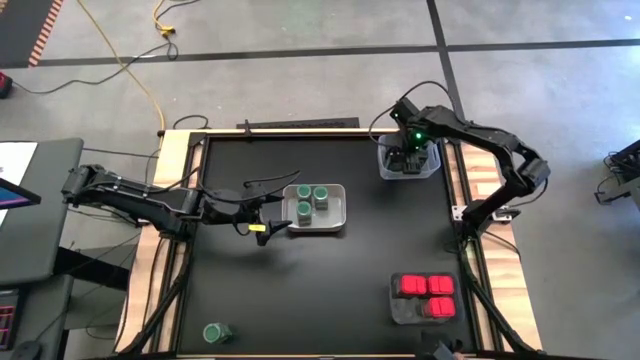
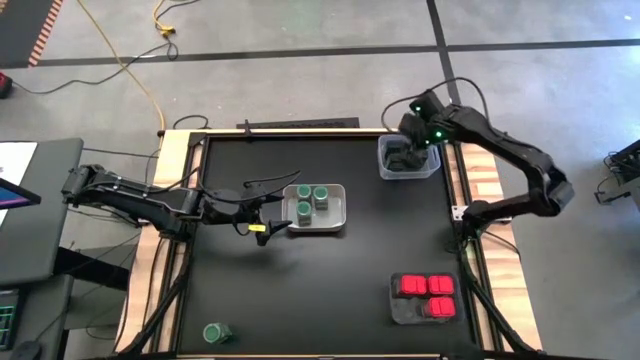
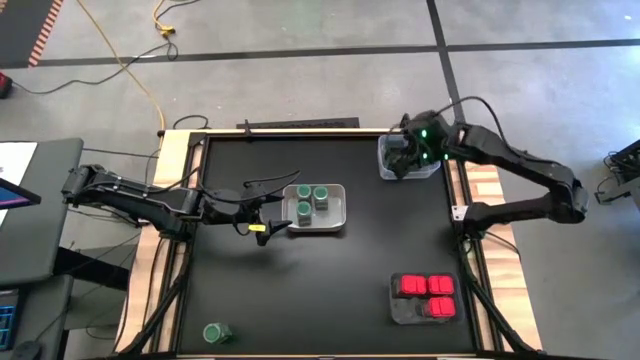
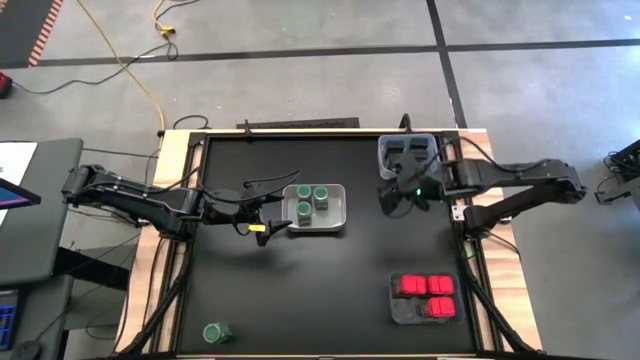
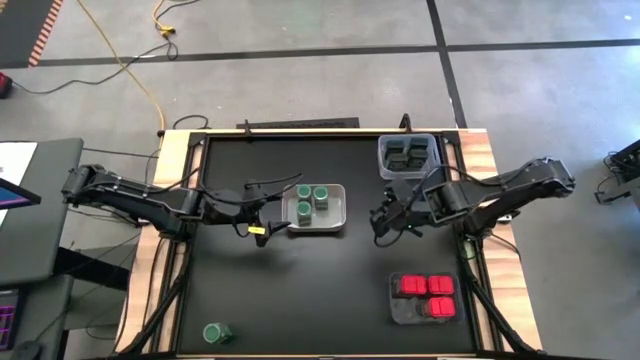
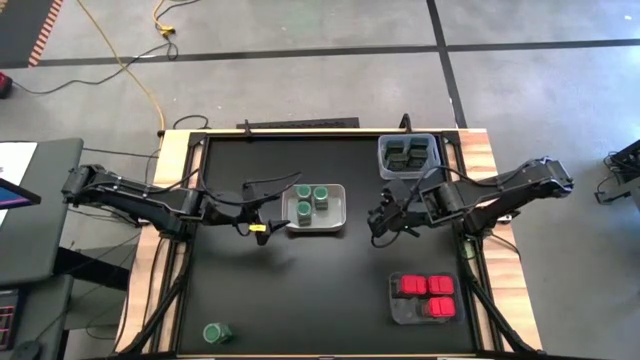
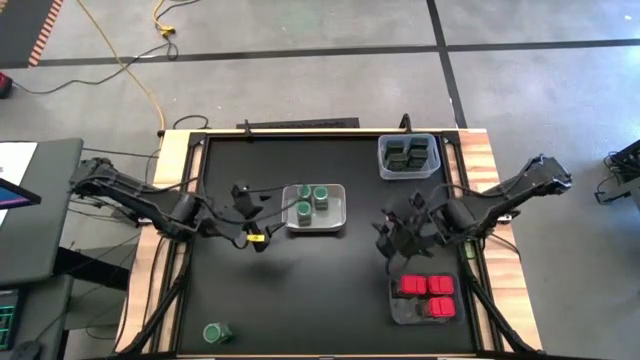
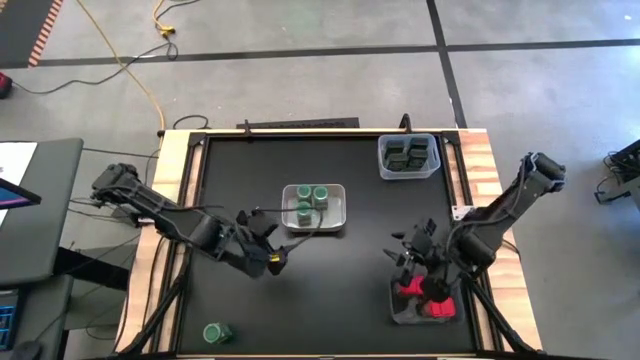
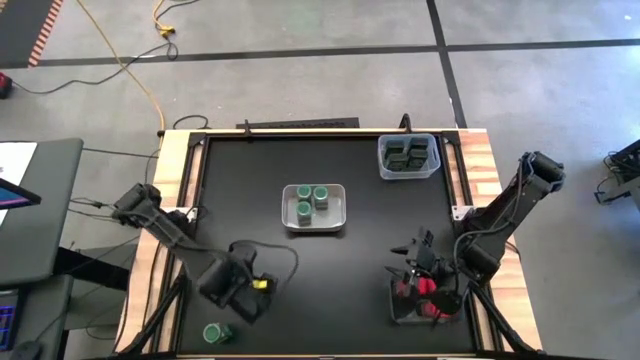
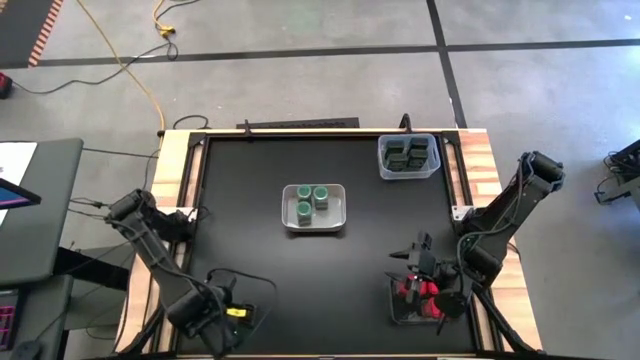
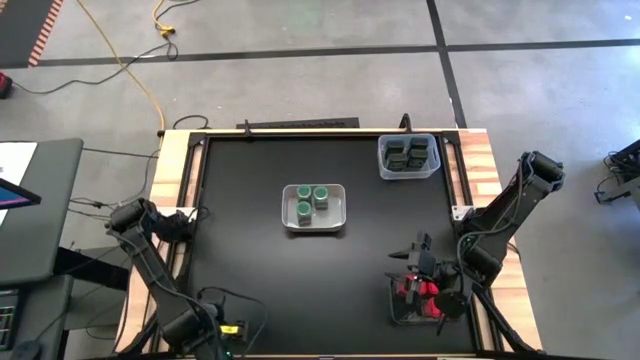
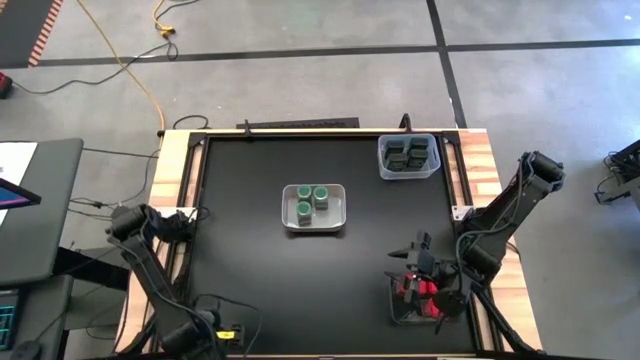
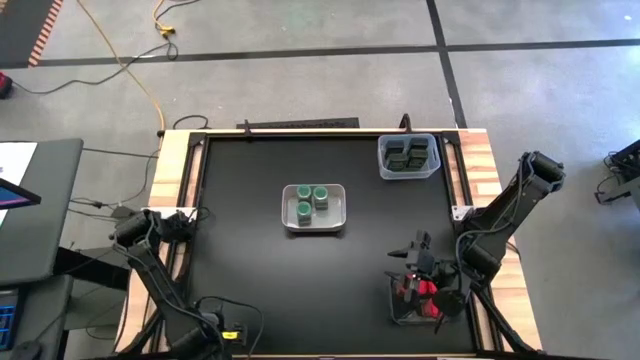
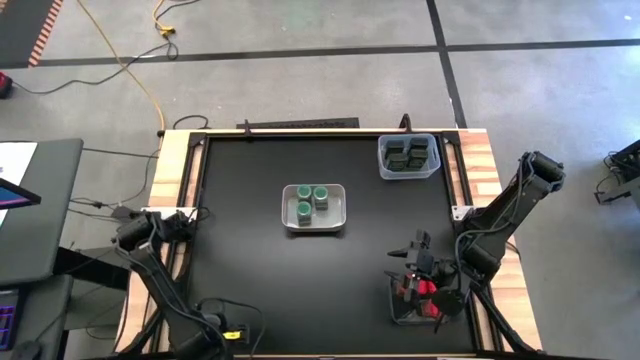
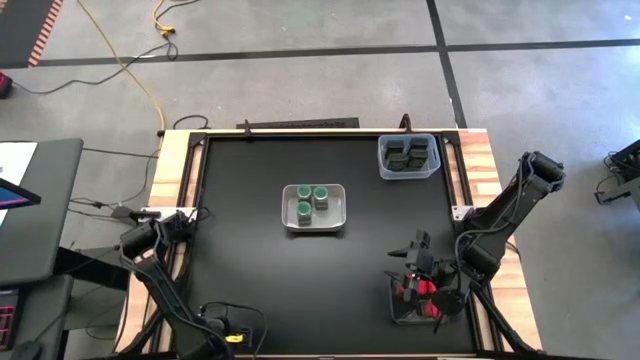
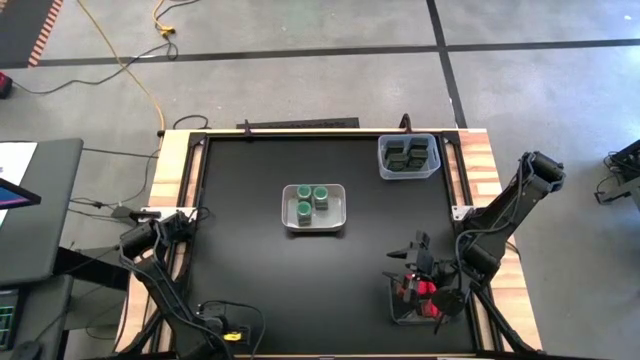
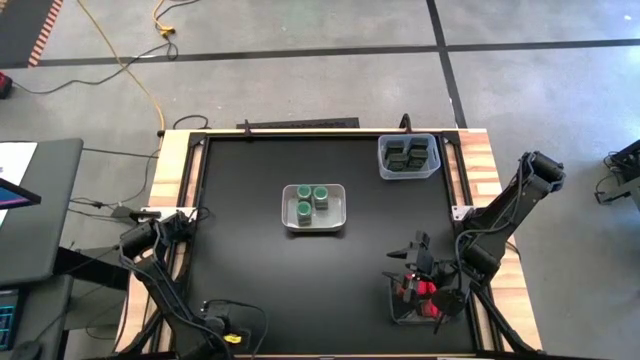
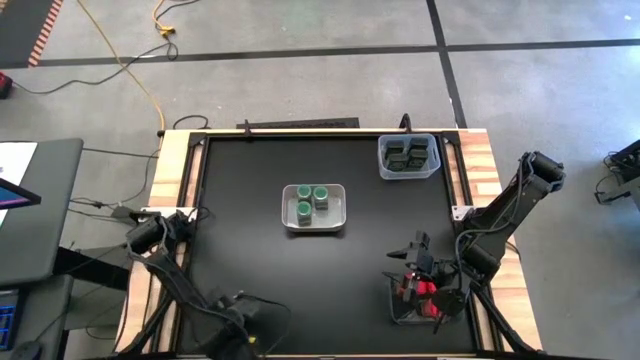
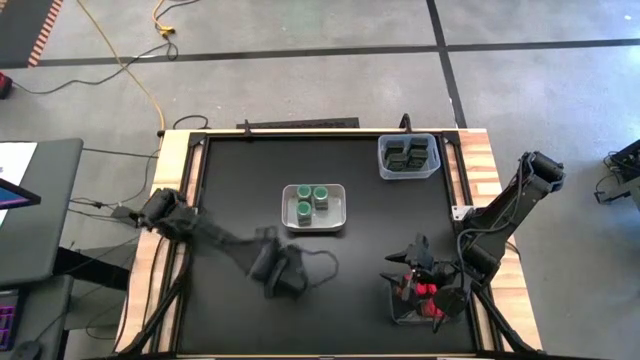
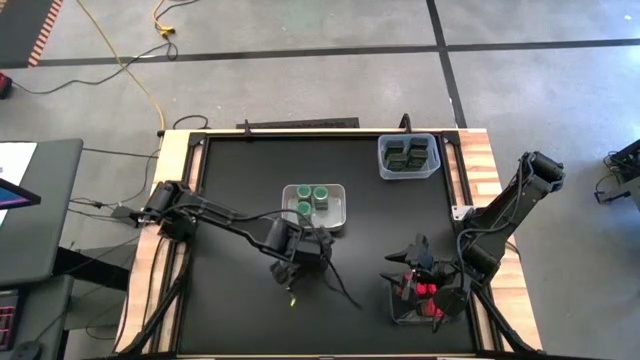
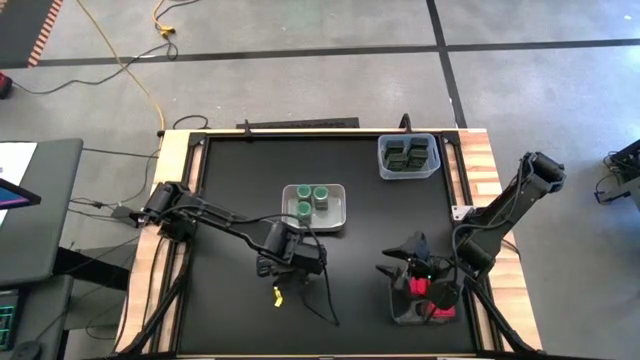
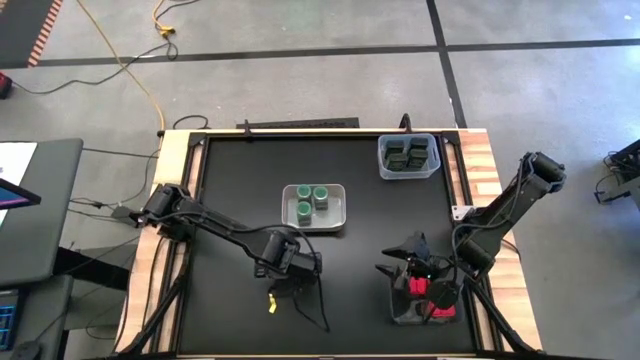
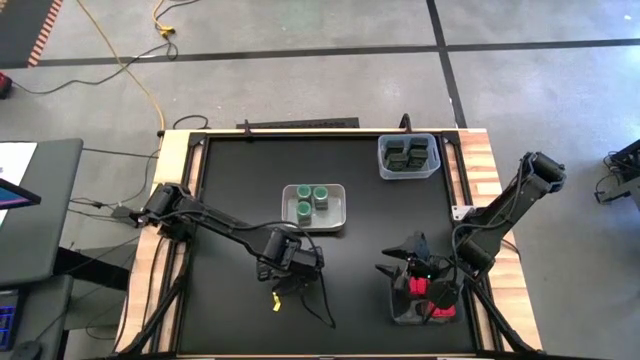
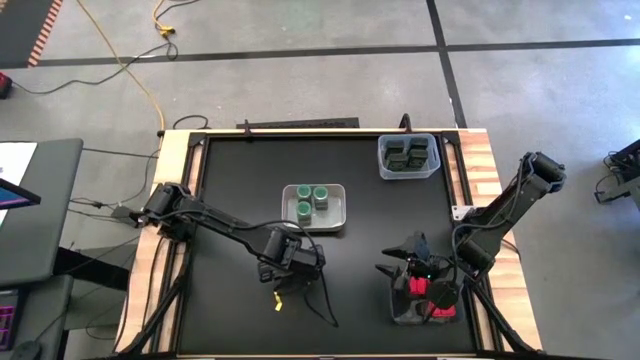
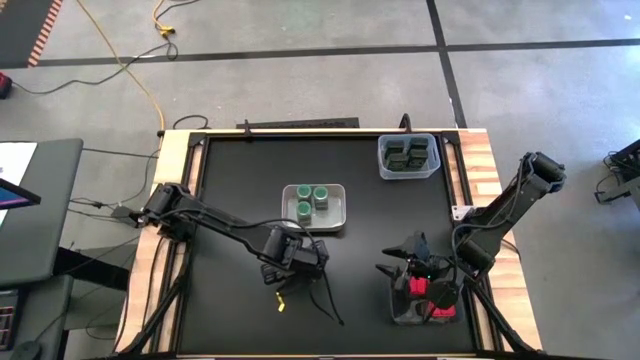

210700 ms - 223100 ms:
Task: Sort spices by type
Put the green seasoning bottle into the white bin

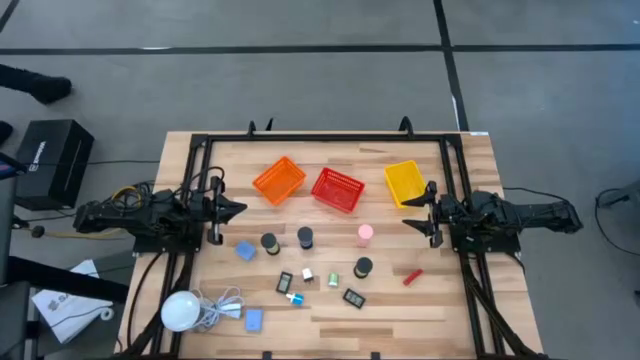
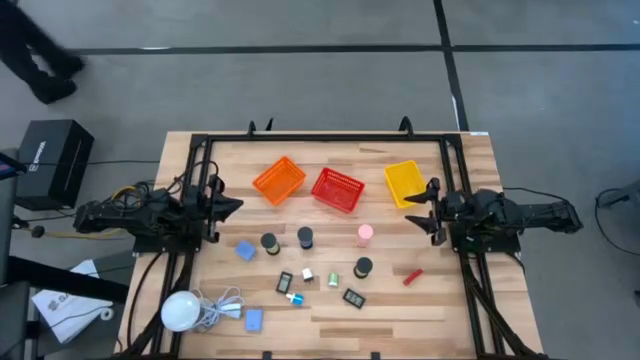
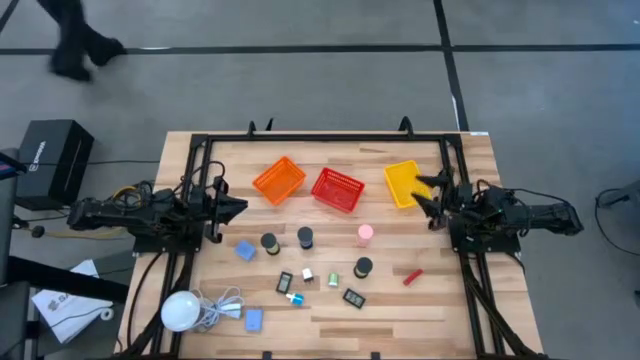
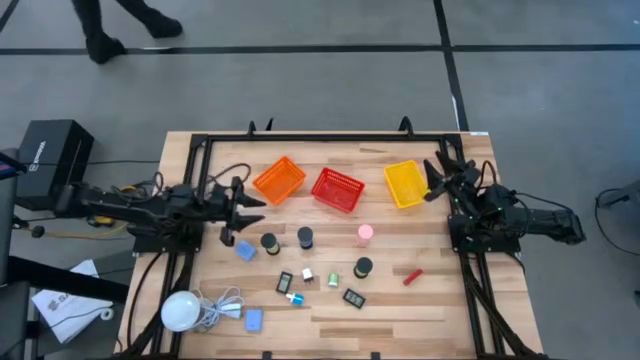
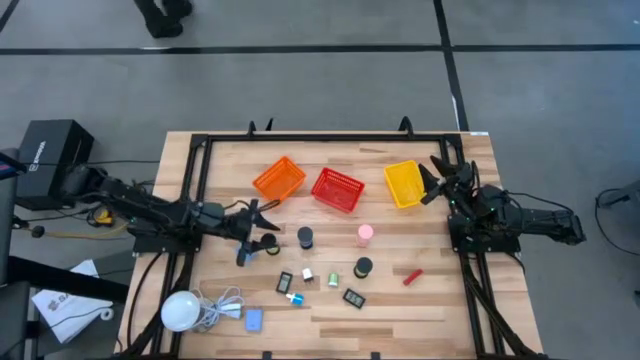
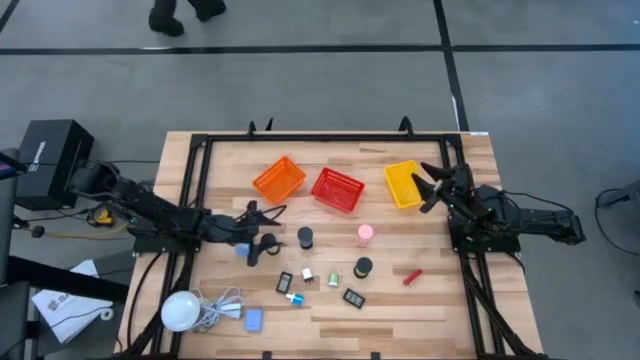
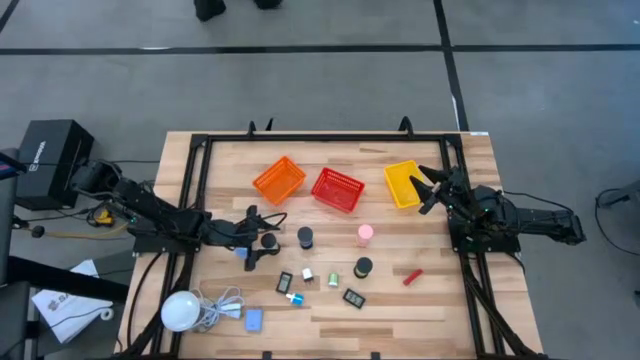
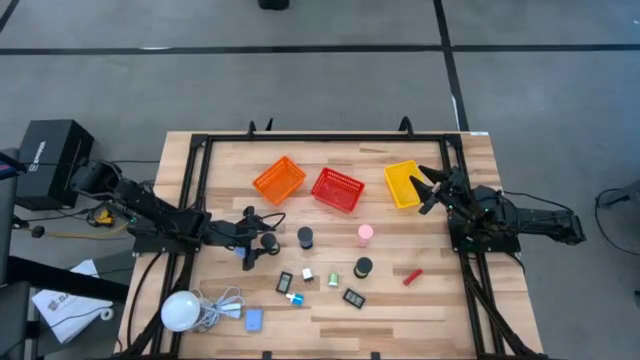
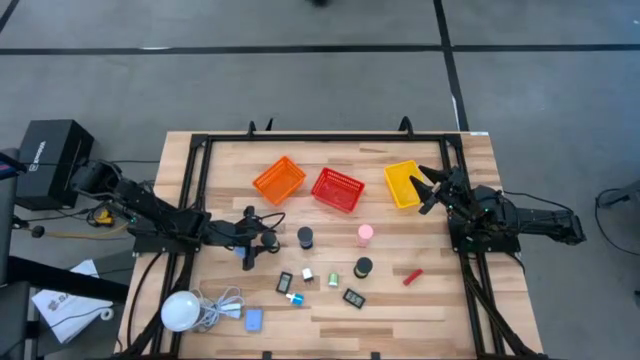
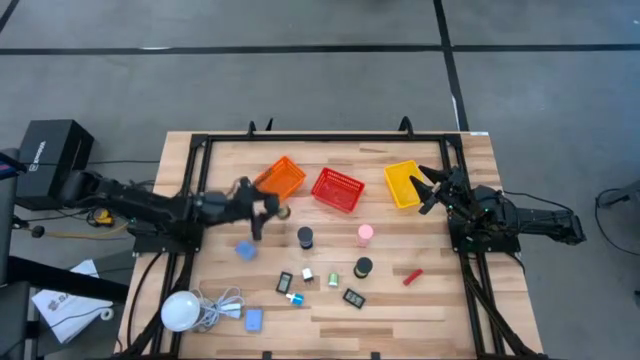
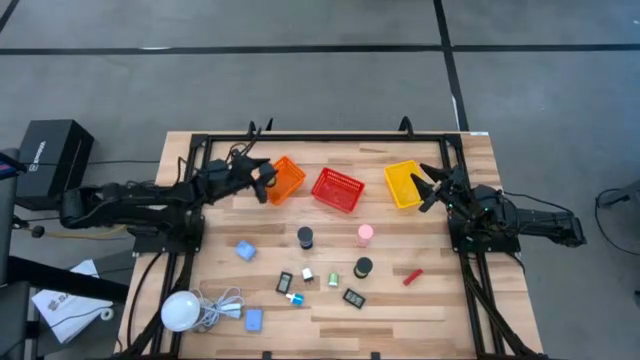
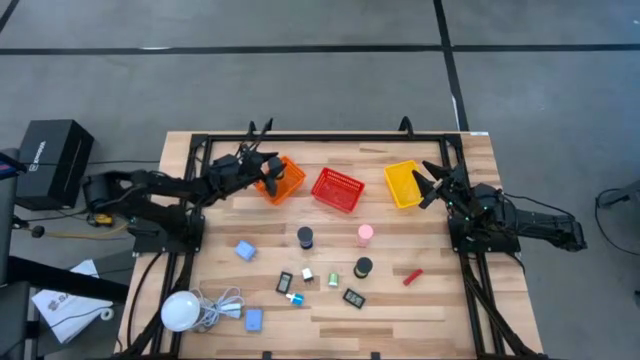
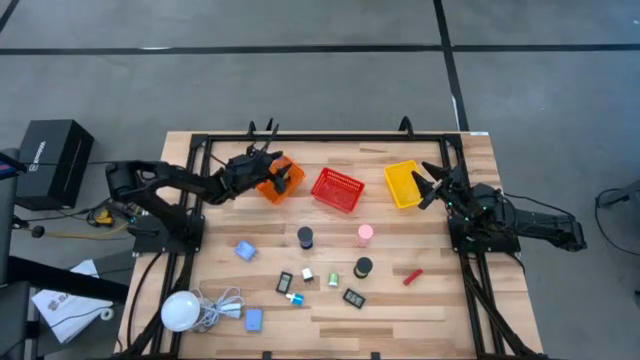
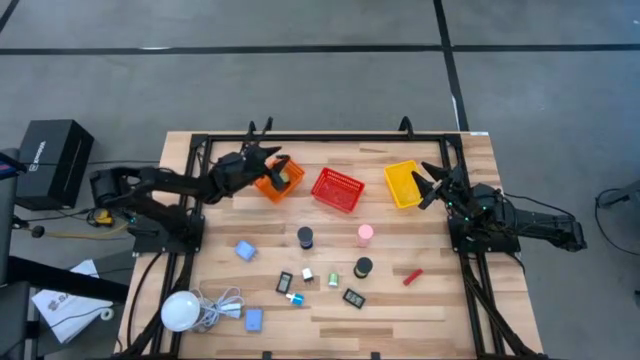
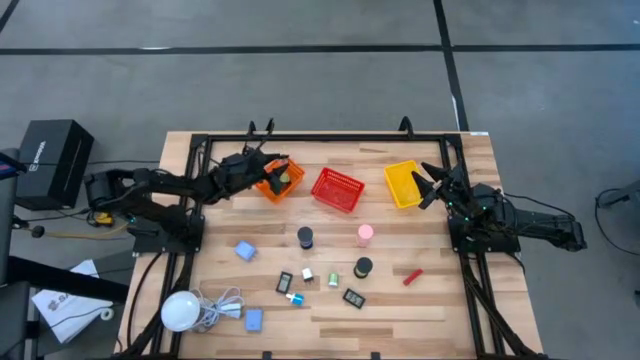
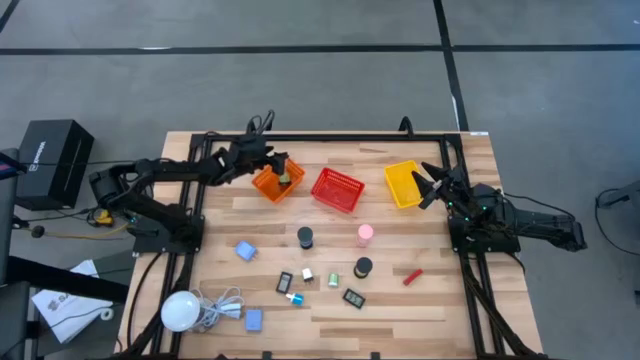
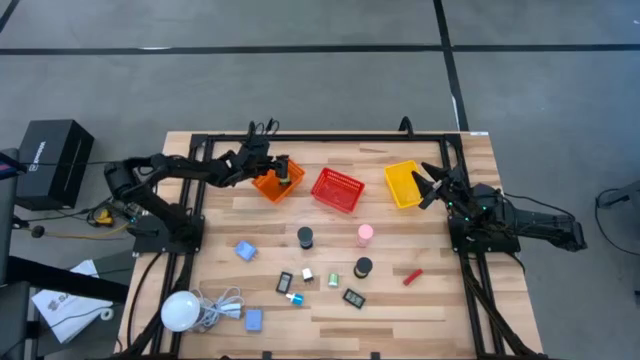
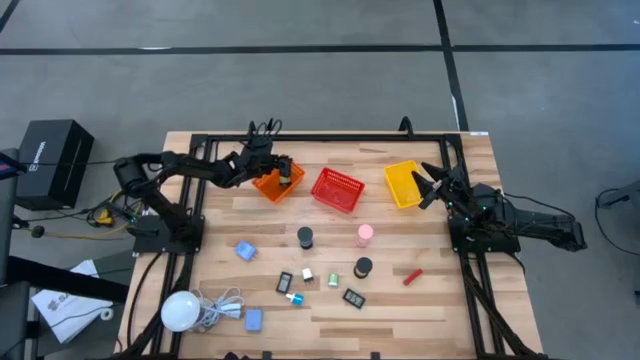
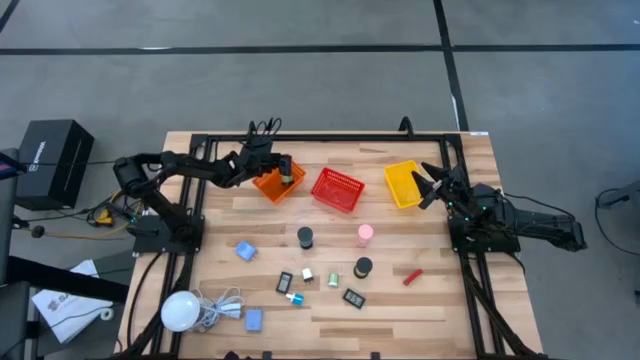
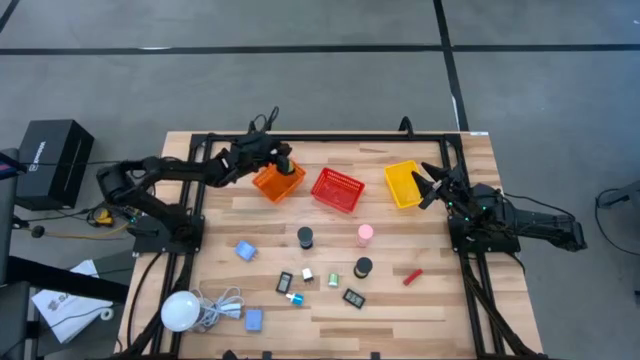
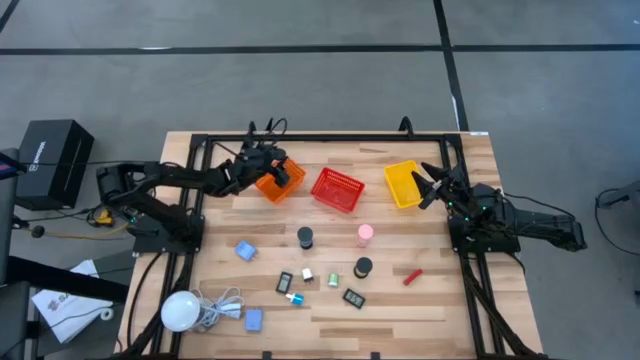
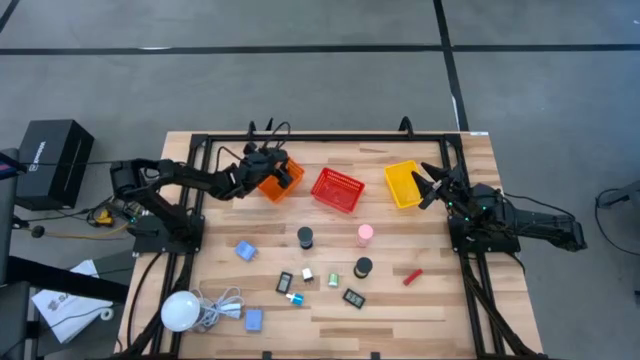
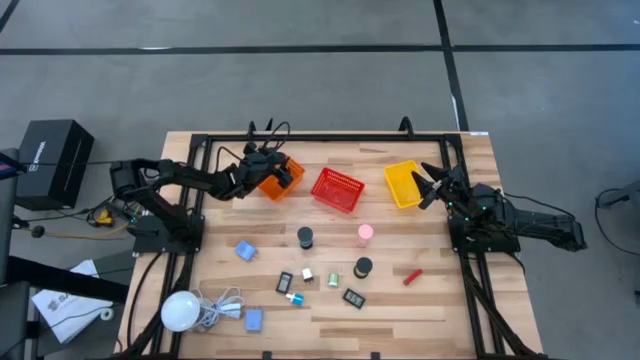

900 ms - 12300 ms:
Task: Pick & Place Office items
Put the left green hourglass into the orange bin
